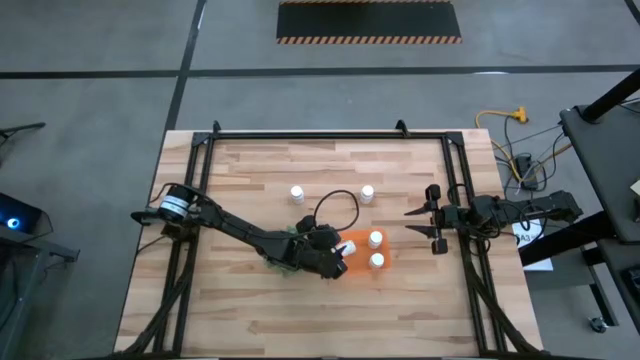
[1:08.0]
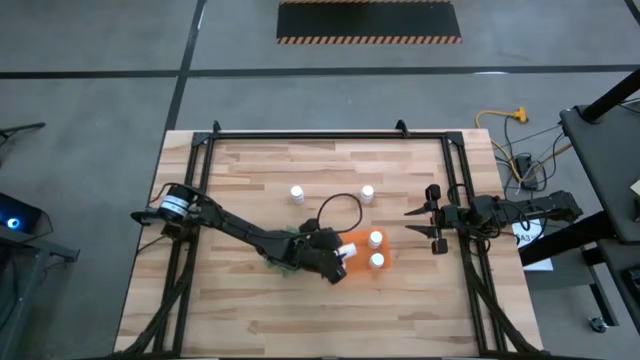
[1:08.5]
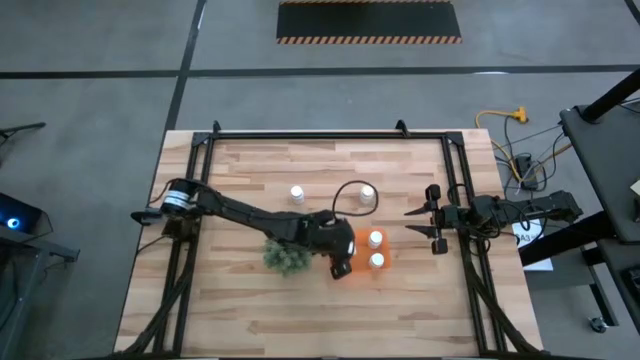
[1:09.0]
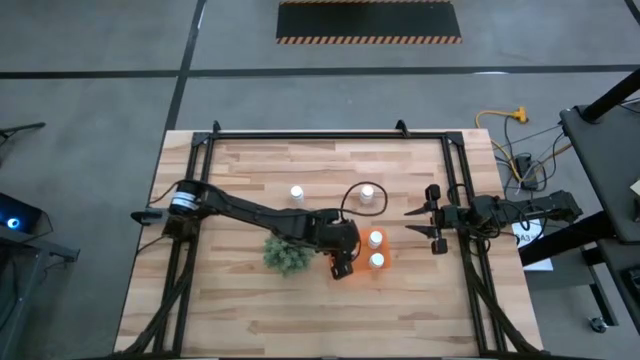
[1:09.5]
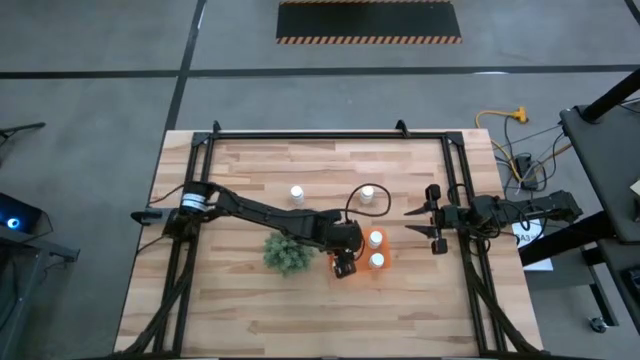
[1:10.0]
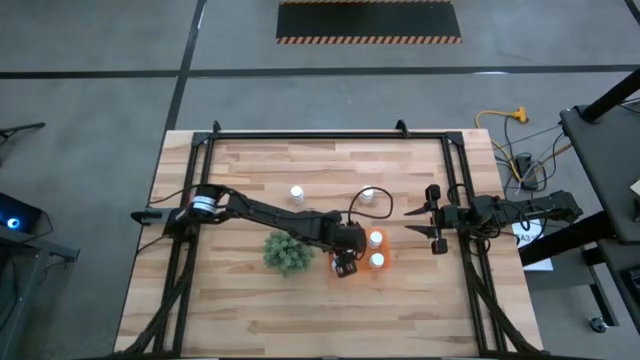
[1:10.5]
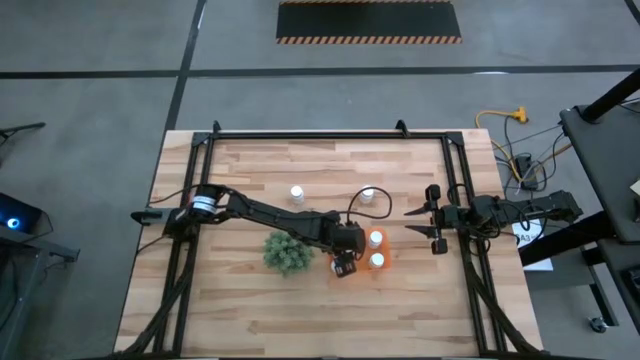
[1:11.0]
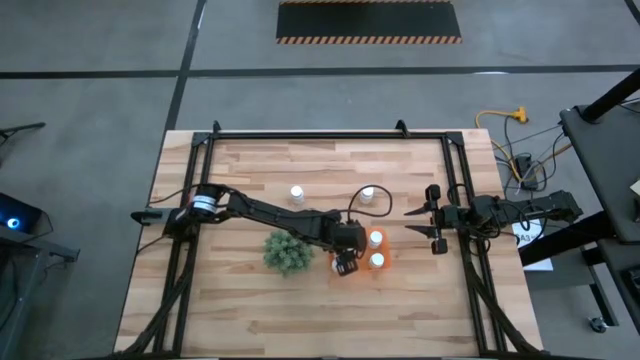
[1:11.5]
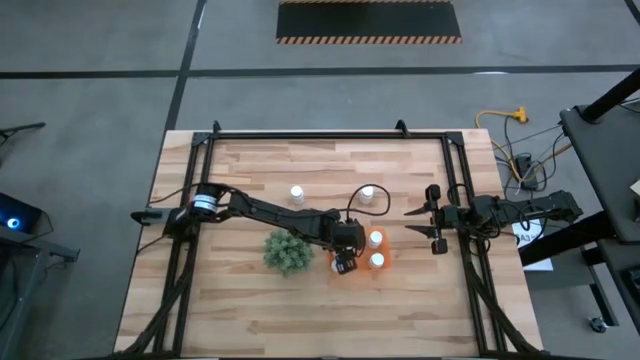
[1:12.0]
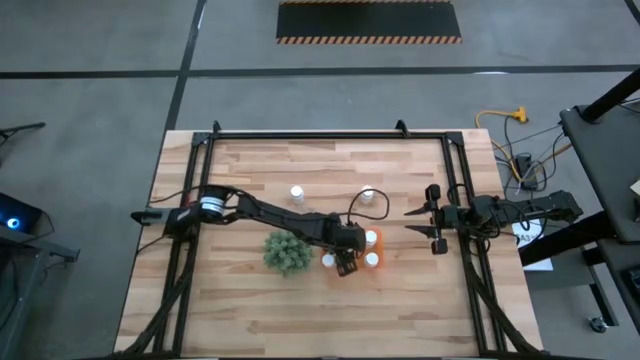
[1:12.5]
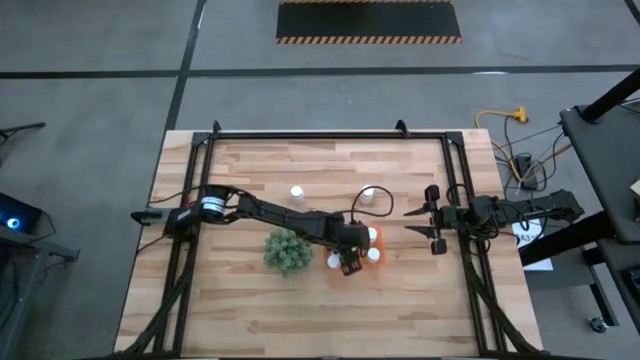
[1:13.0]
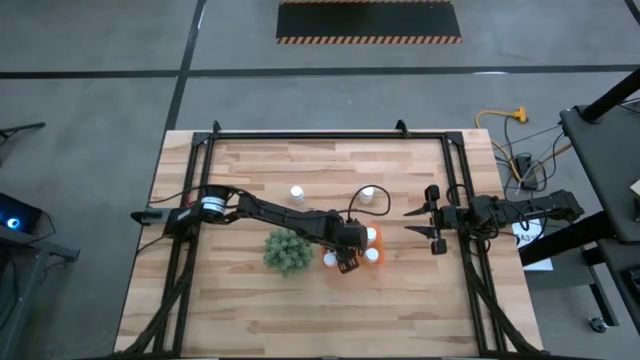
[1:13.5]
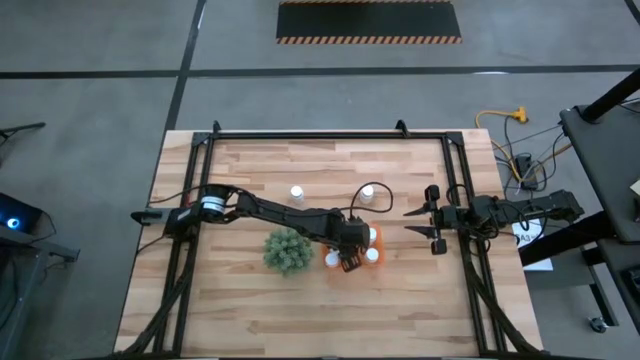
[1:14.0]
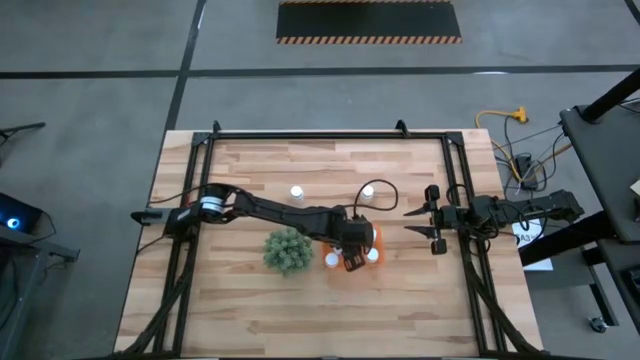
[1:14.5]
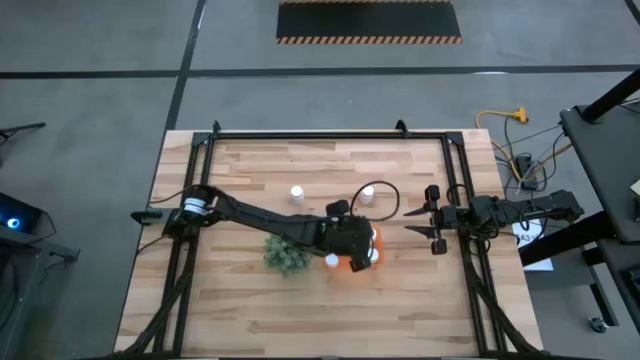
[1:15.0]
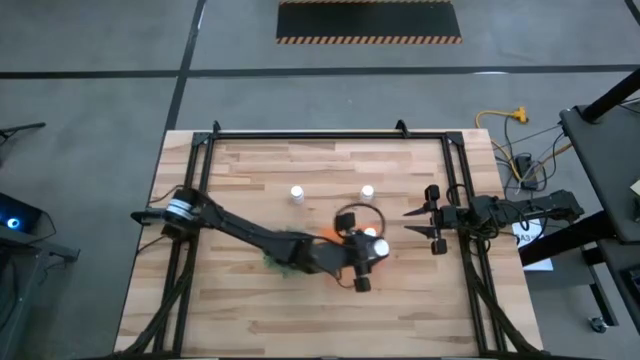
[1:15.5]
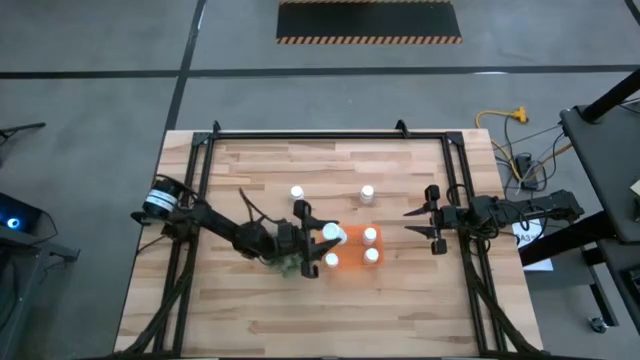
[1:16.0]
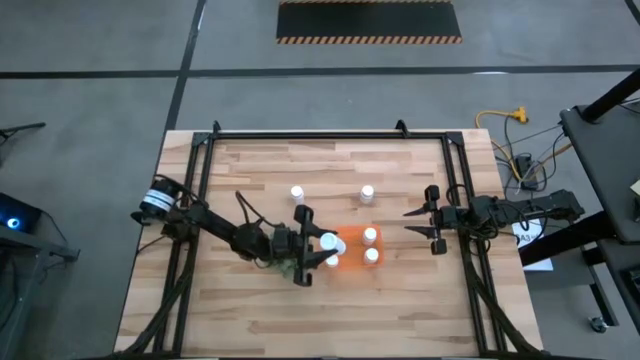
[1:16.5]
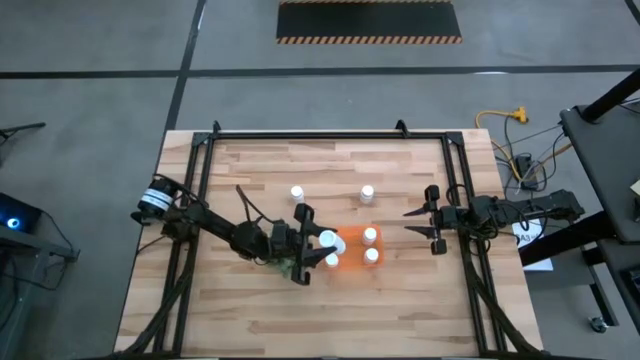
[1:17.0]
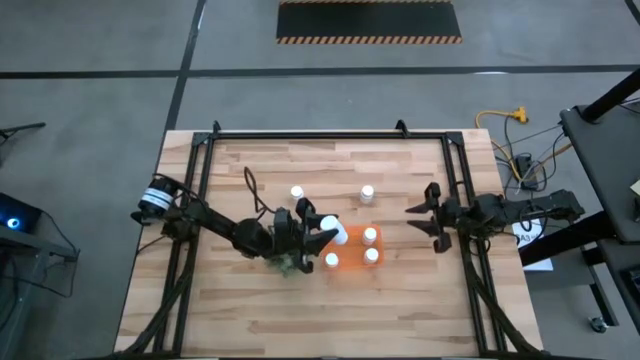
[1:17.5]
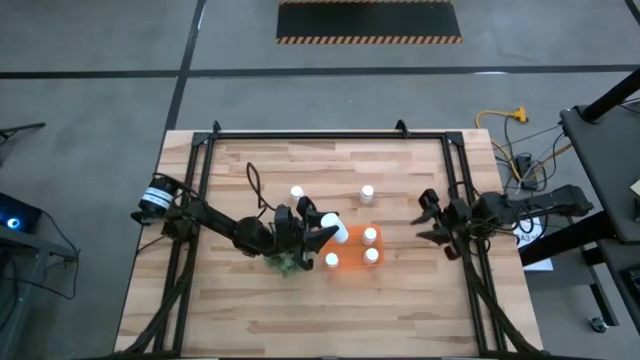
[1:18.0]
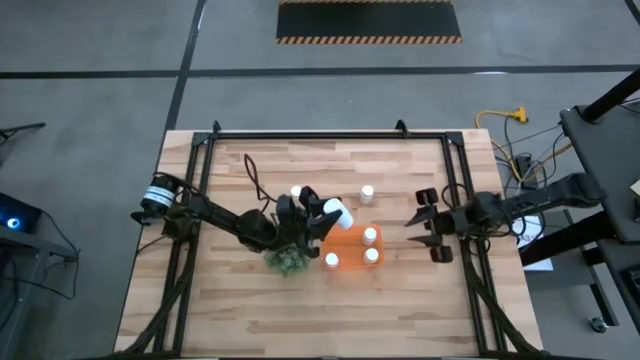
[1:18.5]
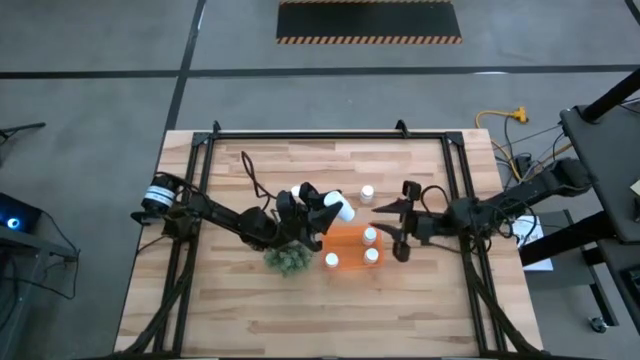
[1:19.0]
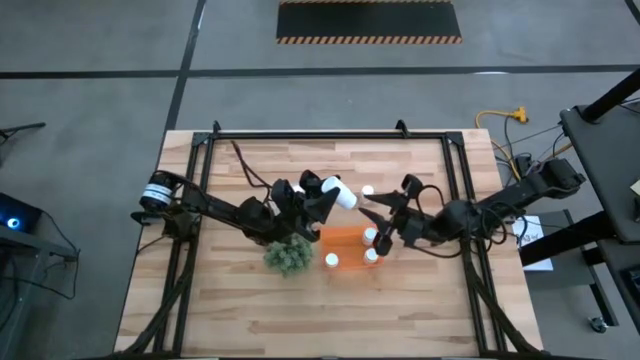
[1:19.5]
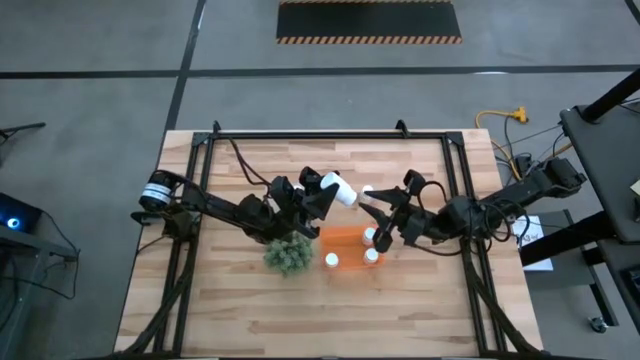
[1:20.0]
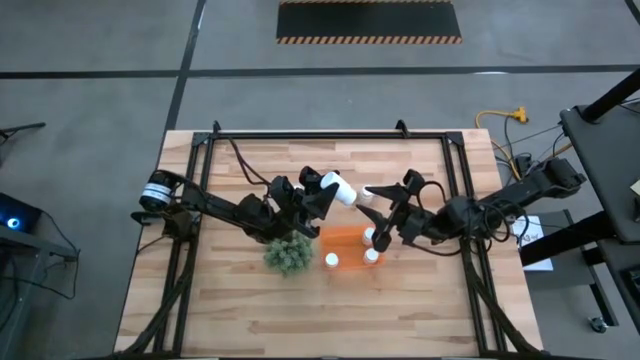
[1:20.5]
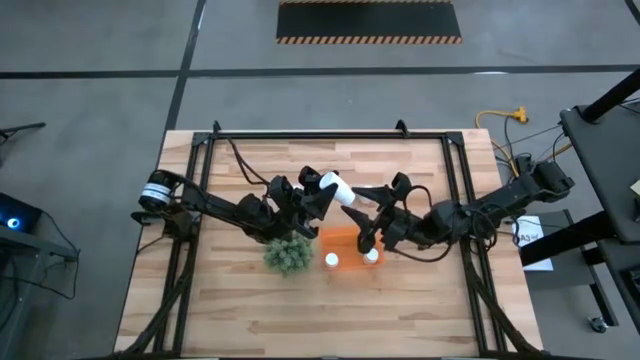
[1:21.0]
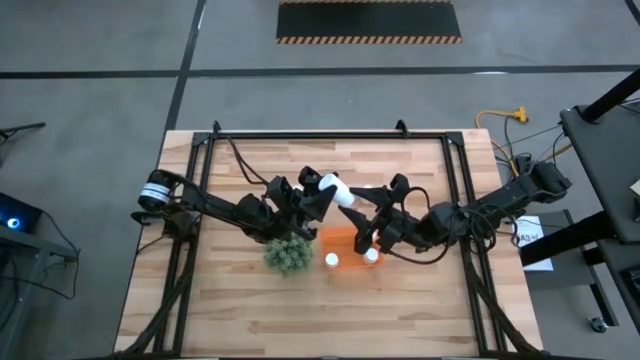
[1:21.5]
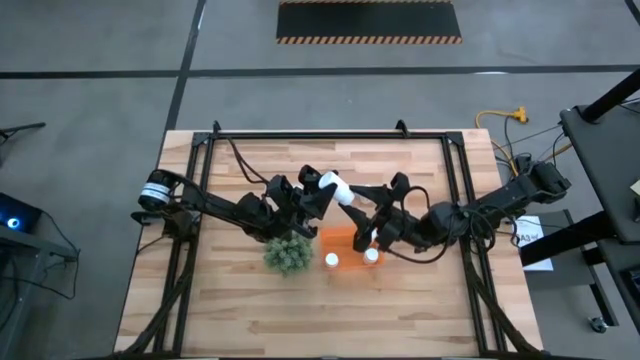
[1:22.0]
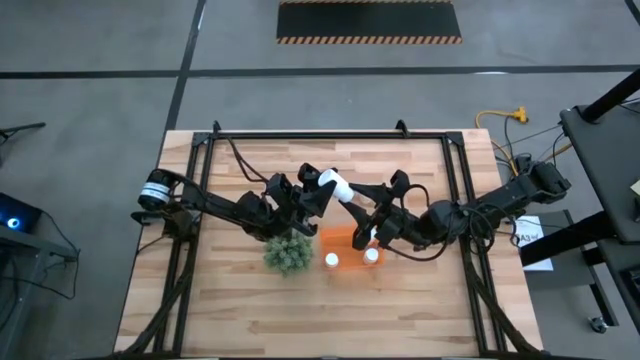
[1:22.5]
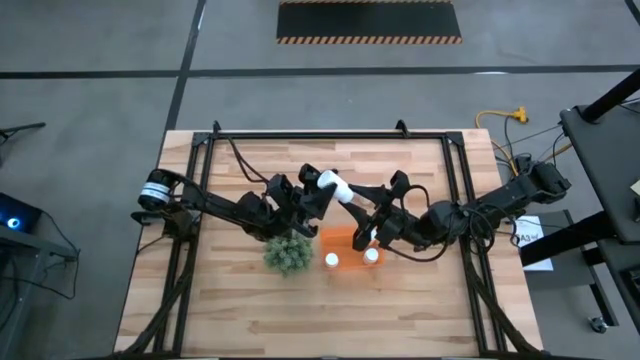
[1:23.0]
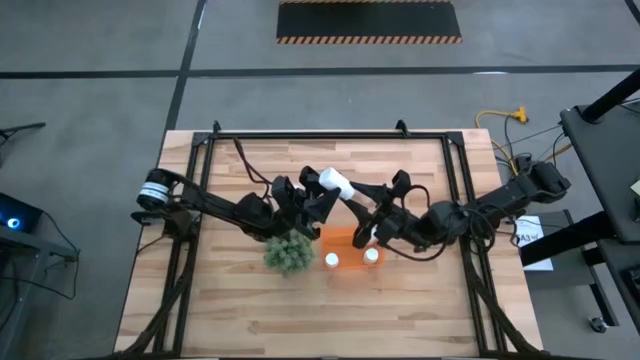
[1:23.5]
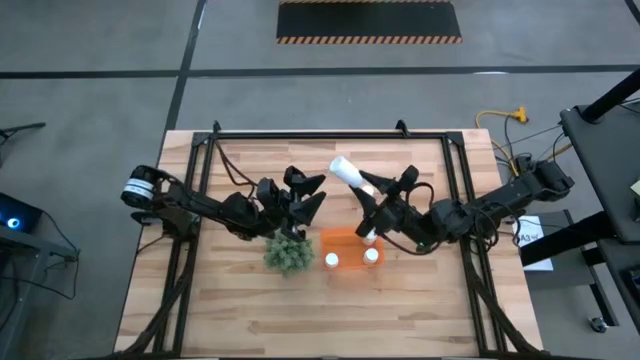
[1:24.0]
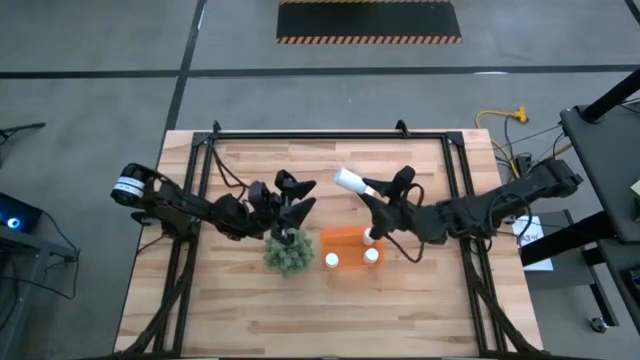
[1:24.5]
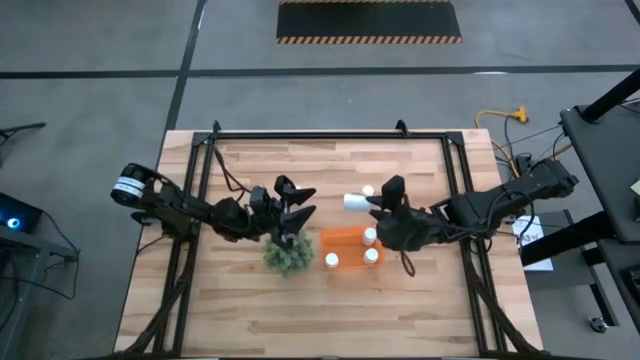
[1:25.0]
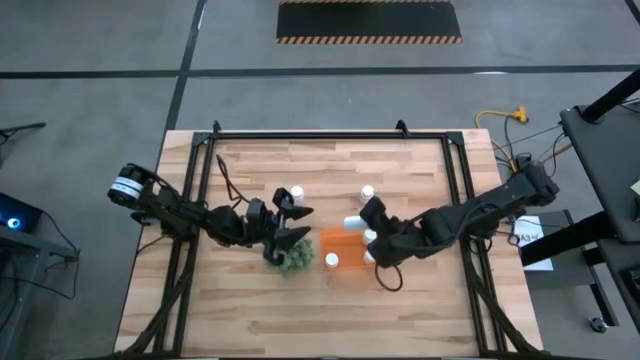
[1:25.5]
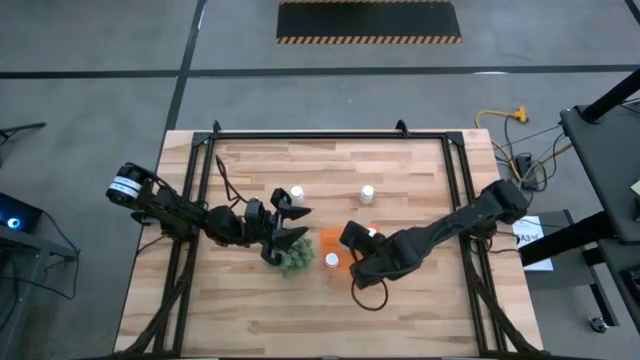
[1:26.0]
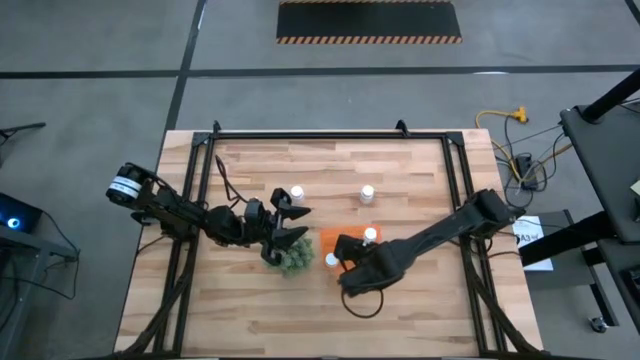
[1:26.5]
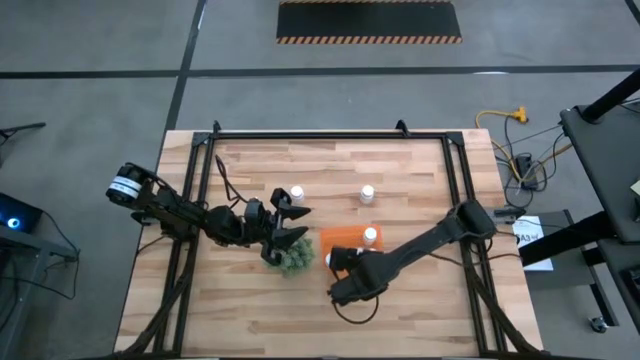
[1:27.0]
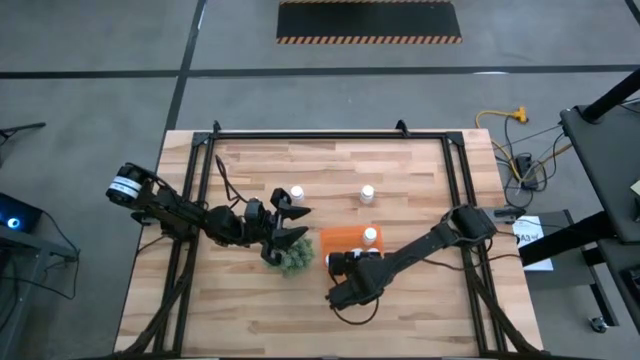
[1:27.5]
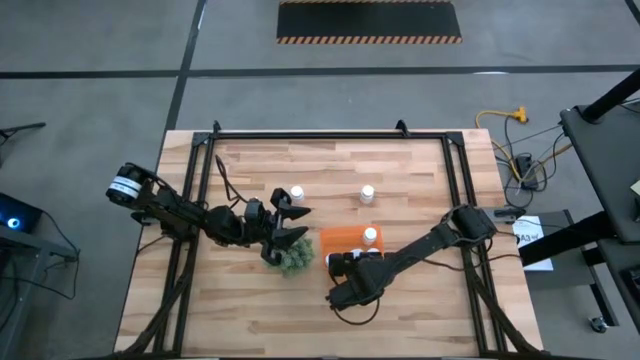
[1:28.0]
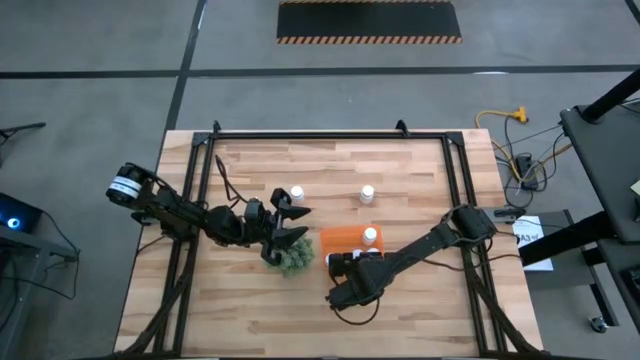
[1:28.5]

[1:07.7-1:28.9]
Task: Pick and place pill bottles into a basket
Put the white pill bottle into the orange bin
